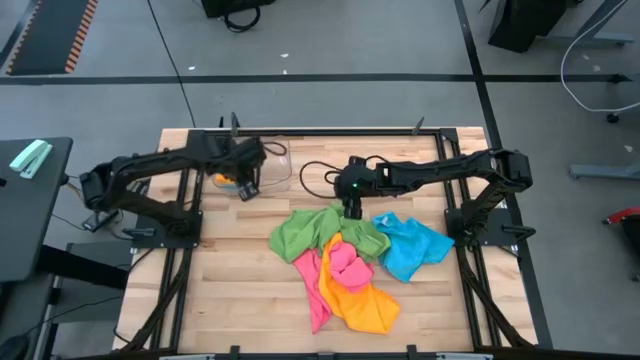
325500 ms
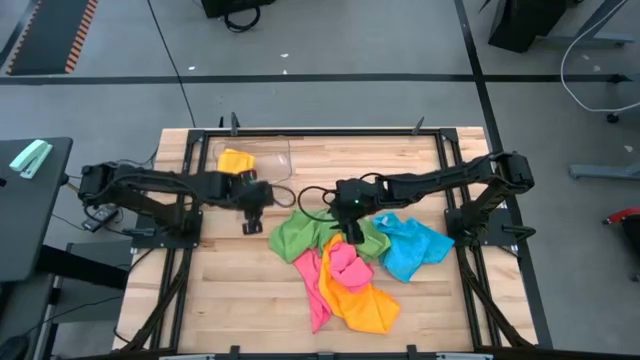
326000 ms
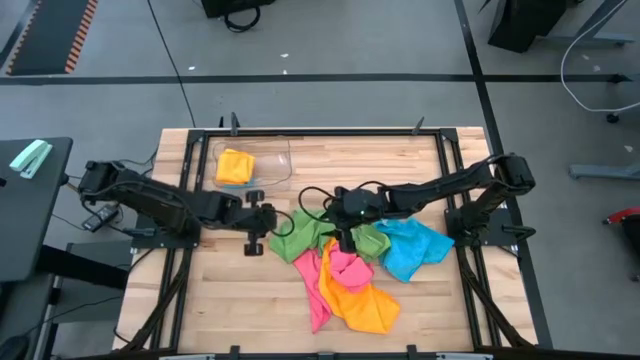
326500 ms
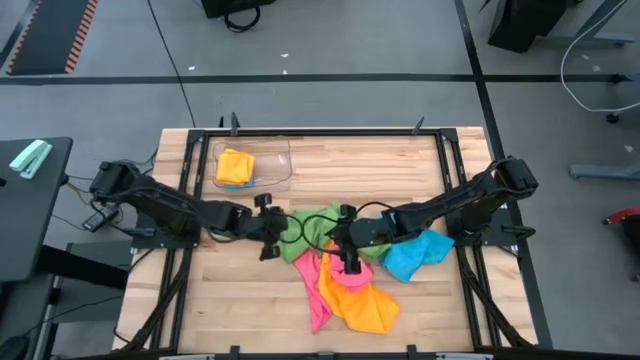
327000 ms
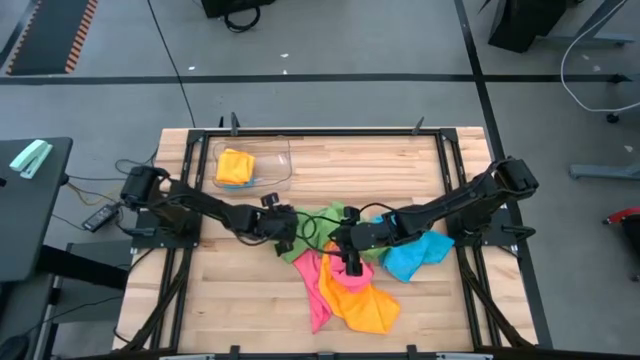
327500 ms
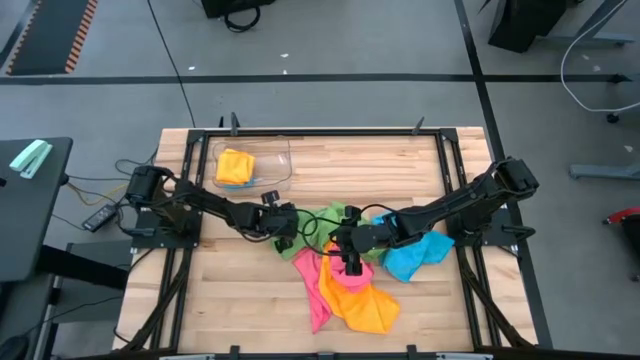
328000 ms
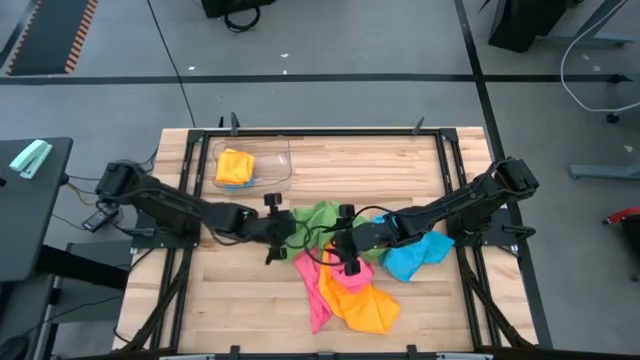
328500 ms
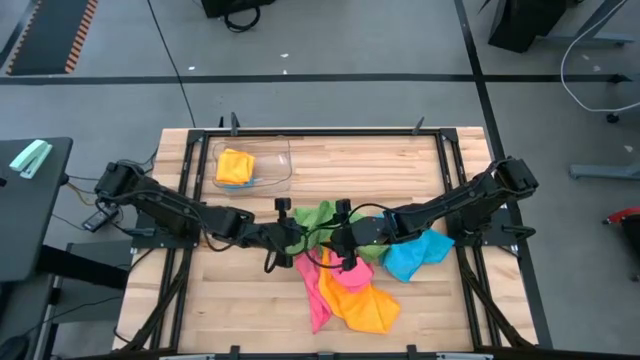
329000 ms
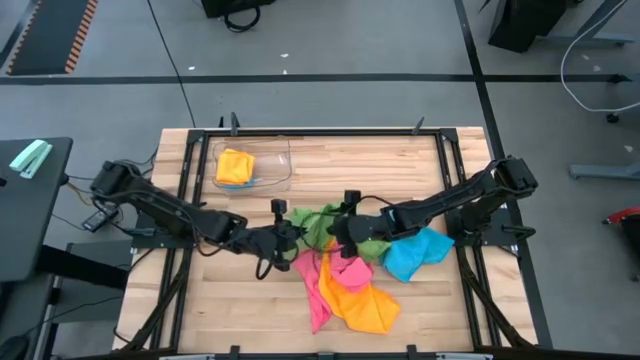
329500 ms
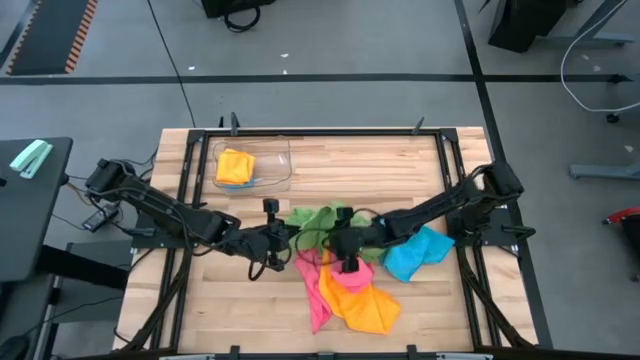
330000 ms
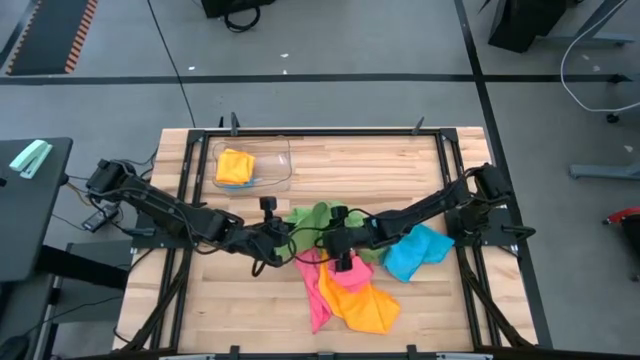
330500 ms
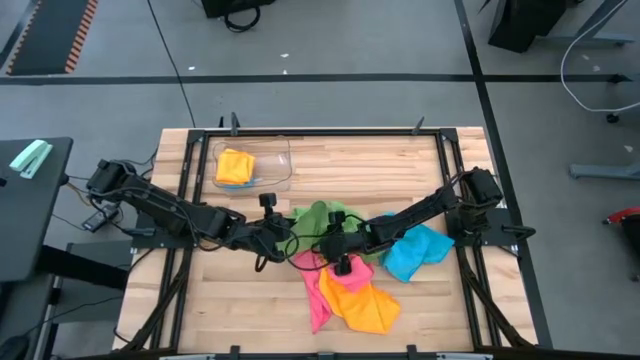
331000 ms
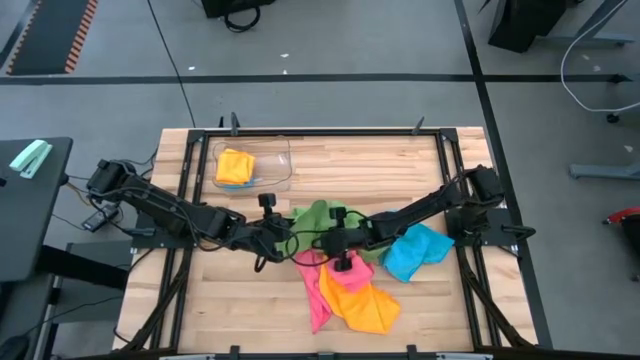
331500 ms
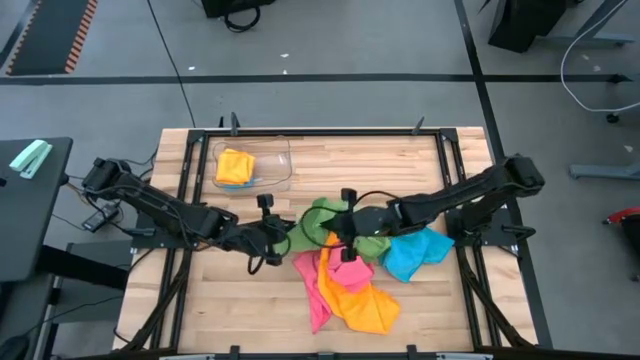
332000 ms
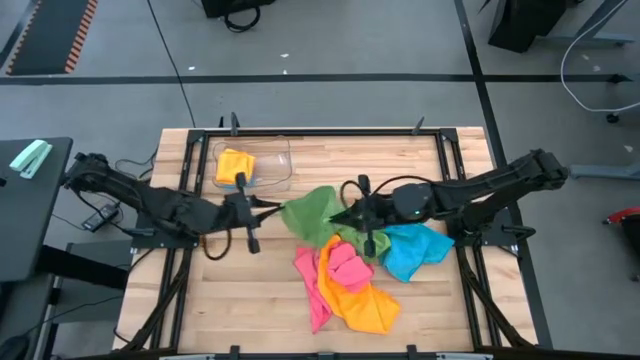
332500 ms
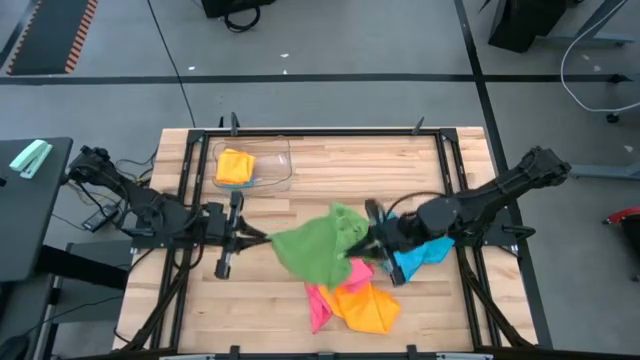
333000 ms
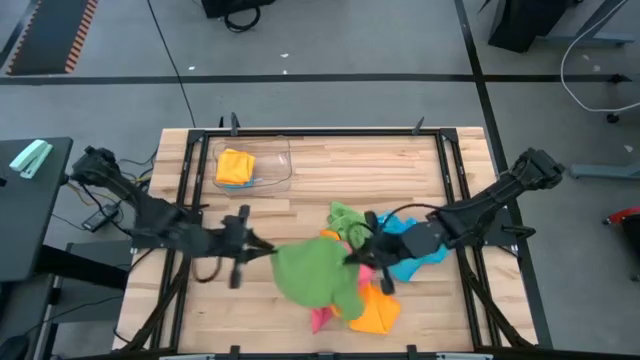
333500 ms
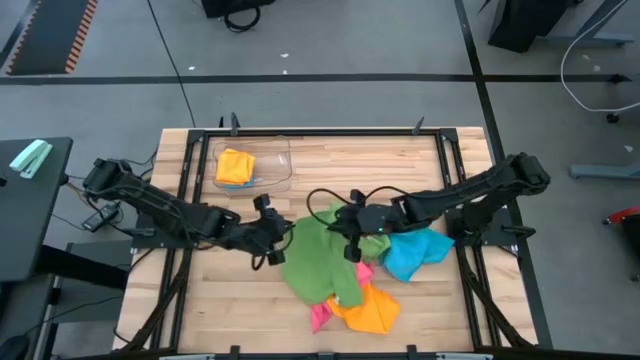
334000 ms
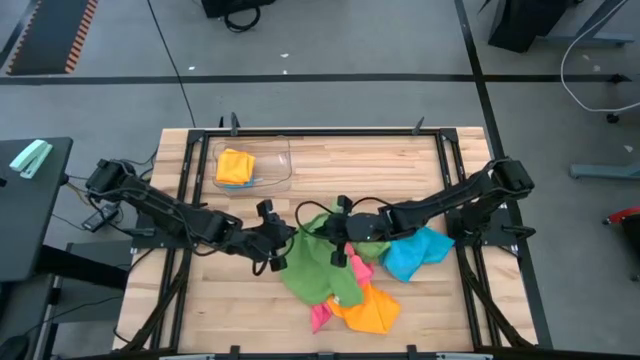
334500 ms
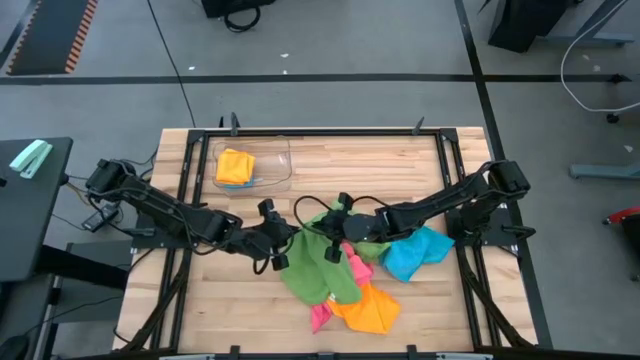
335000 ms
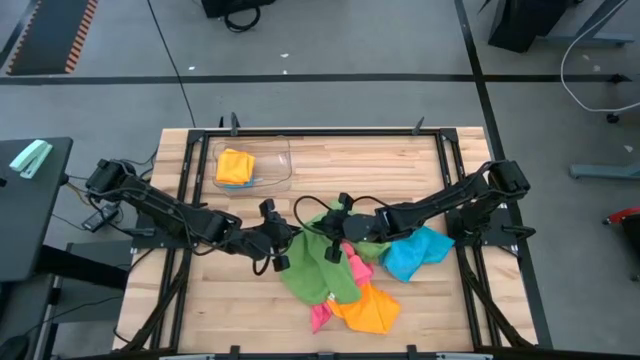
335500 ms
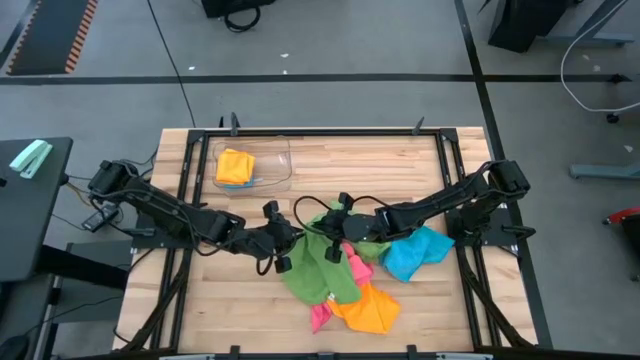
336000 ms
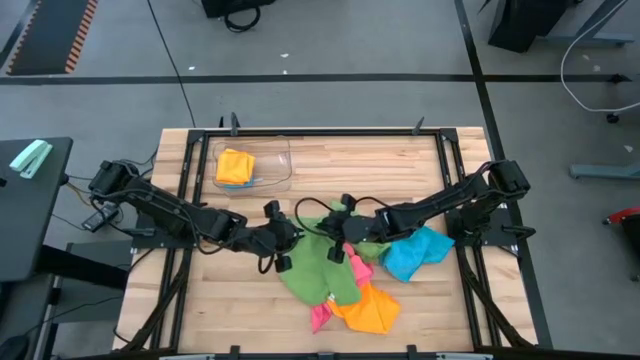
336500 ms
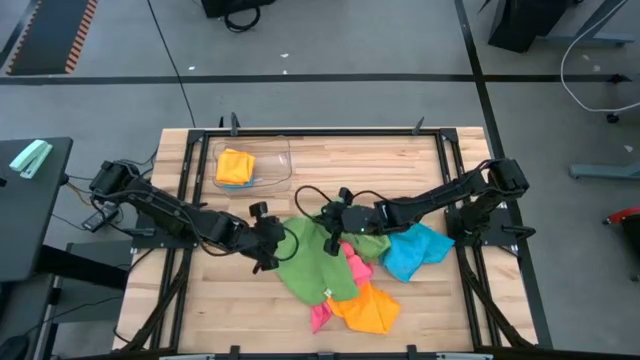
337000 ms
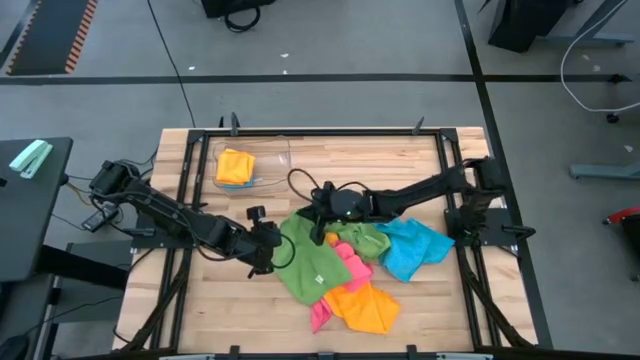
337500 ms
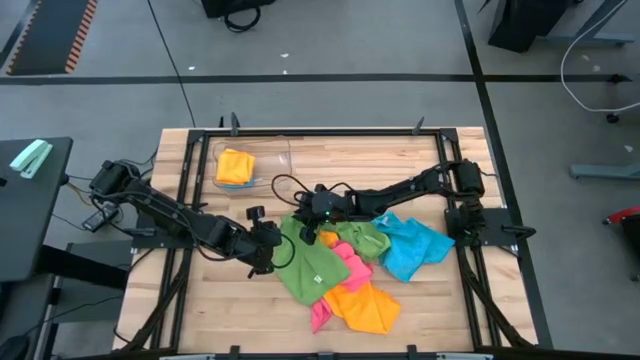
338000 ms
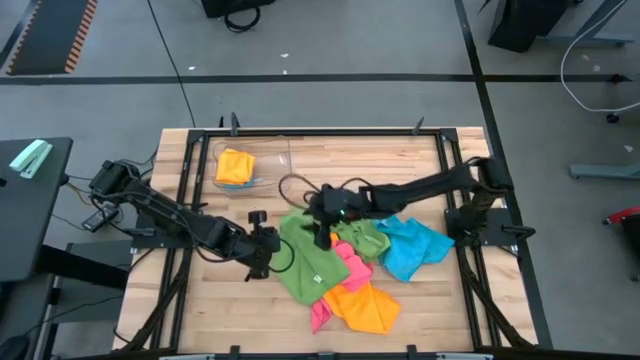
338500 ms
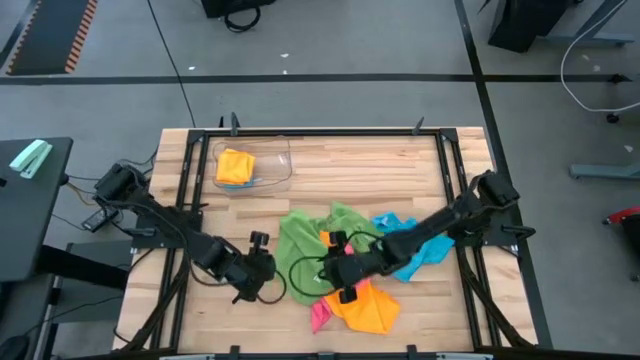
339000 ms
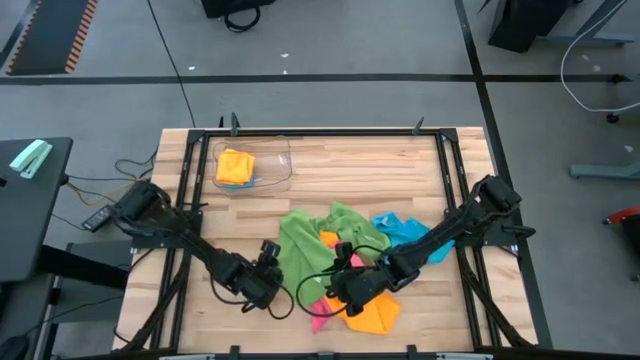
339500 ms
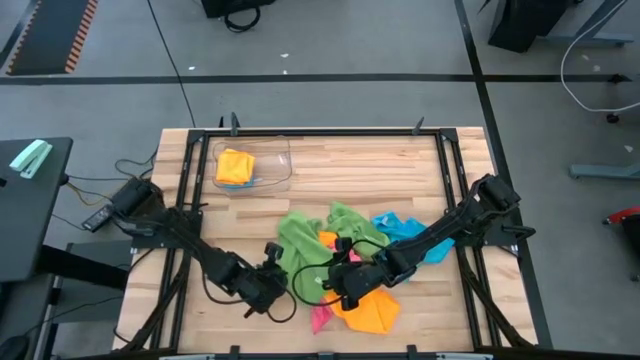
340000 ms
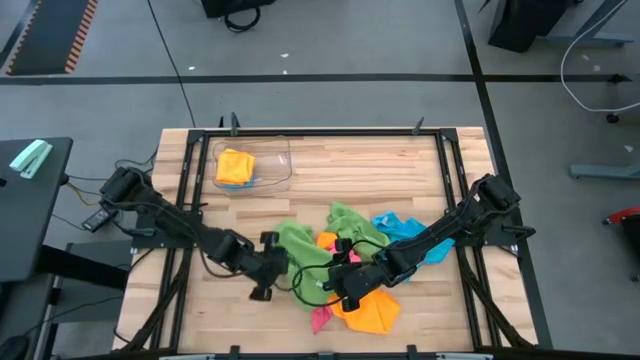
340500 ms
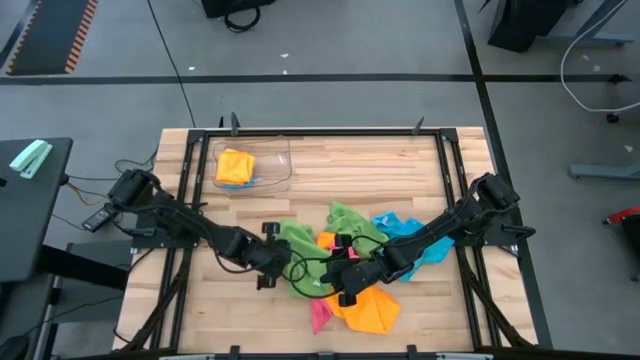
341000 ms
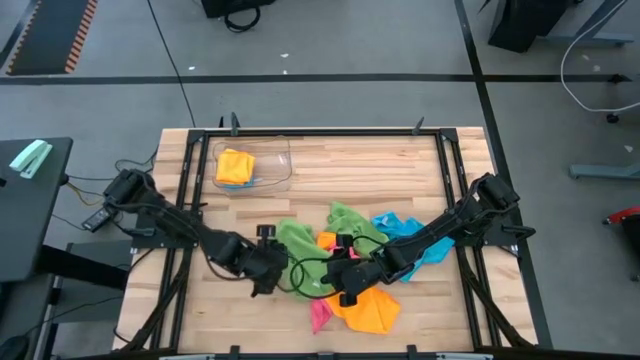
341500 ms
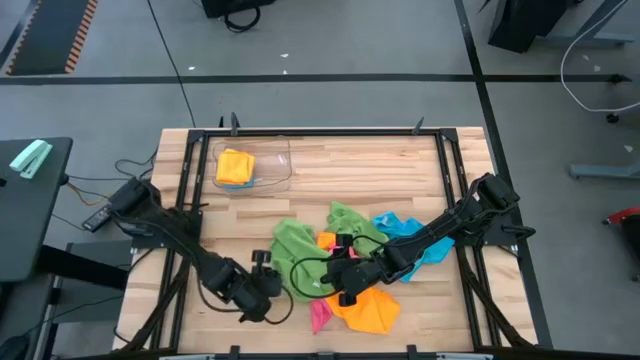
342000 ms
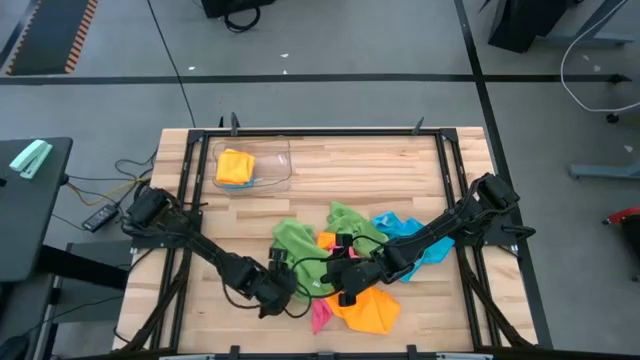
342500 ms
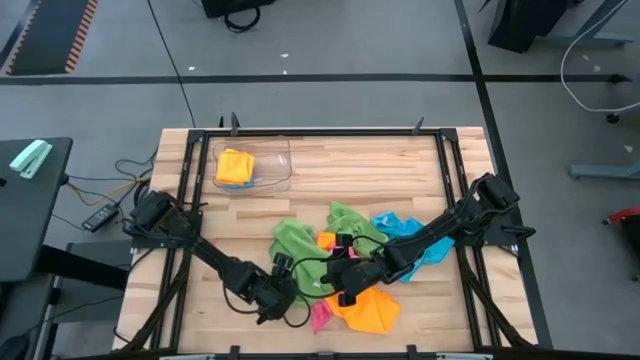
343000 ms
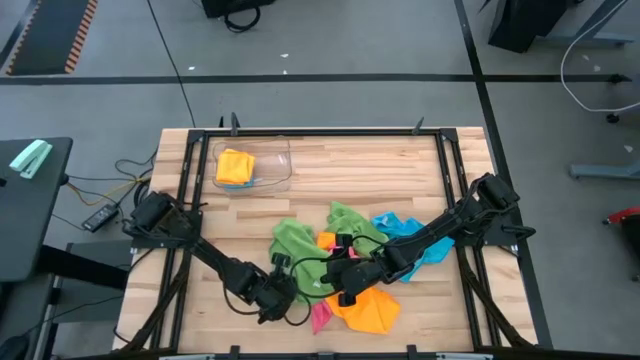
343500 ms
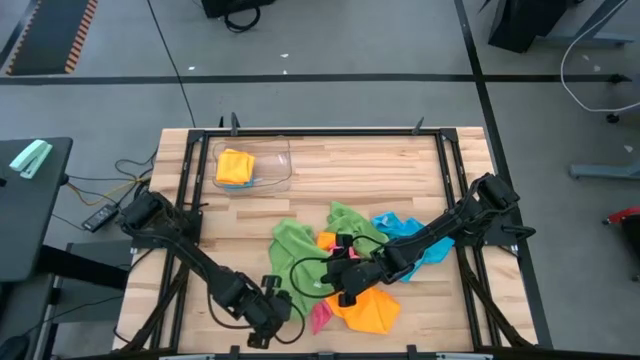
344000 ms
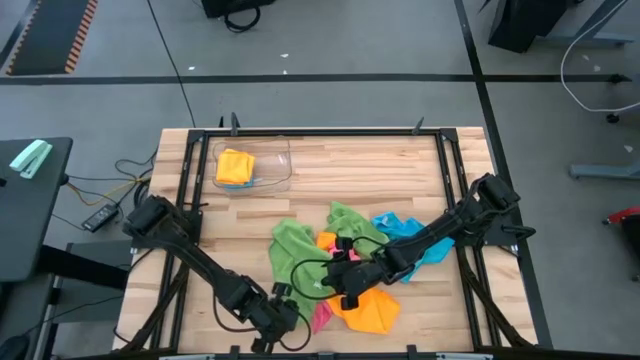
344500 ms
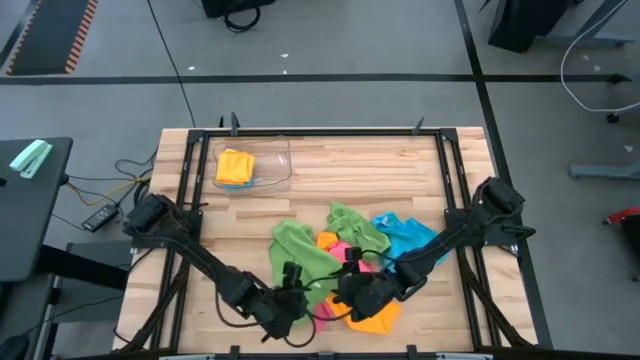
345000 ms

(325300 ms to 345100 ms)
Task: Fold microfiber towels
Fold the left green microfiber towel

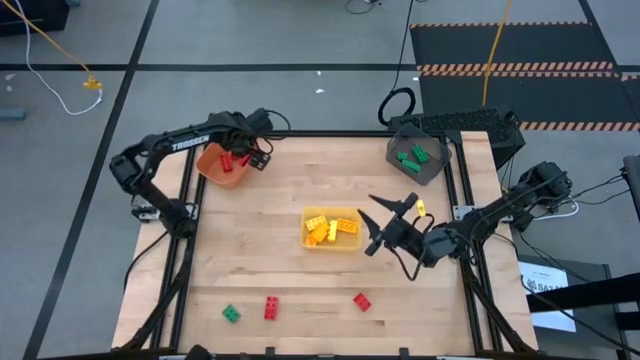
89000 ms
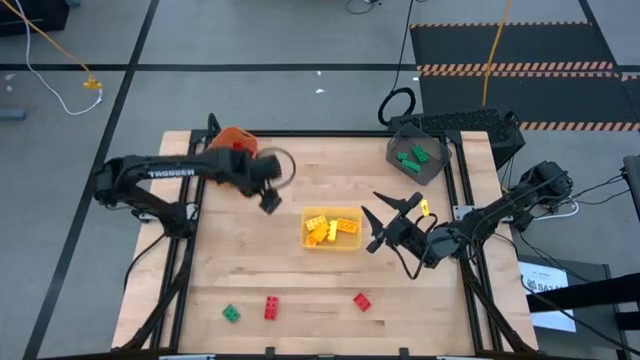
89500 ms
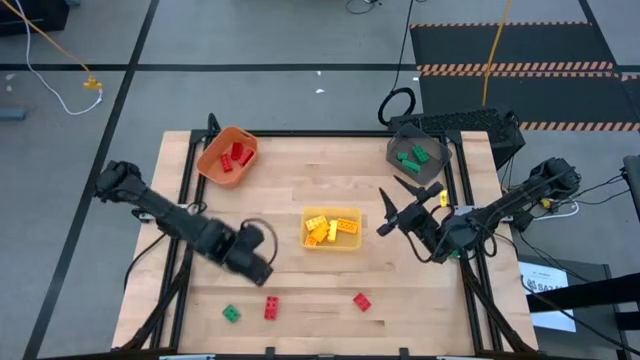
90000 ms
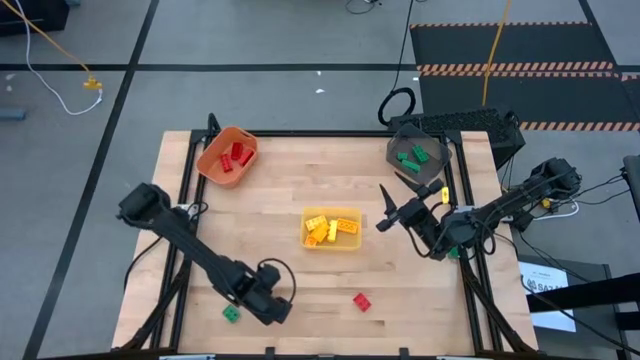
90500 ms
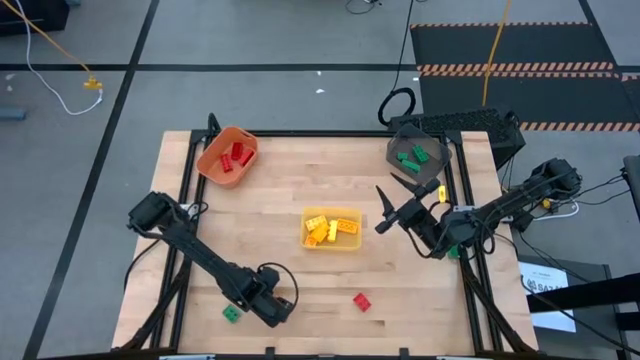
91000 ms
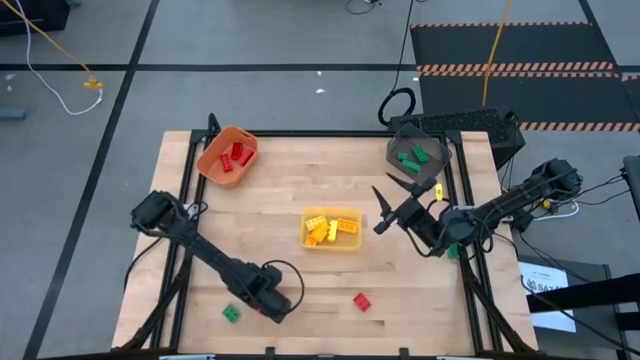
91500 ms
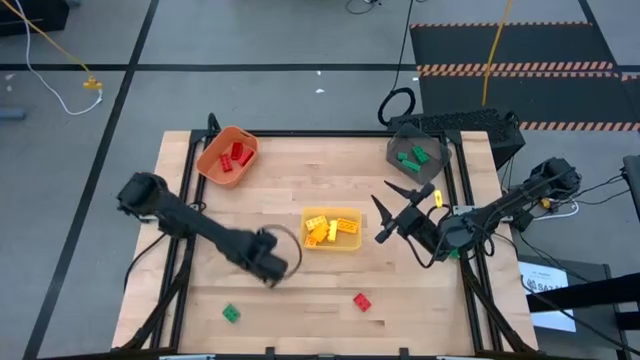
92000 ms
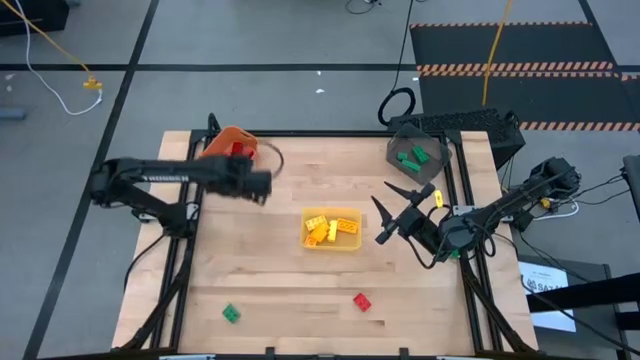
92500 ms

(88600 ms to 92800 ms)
Task: Sort & place blocks by color
Put the left red 8-stud game piece into the orange bin
